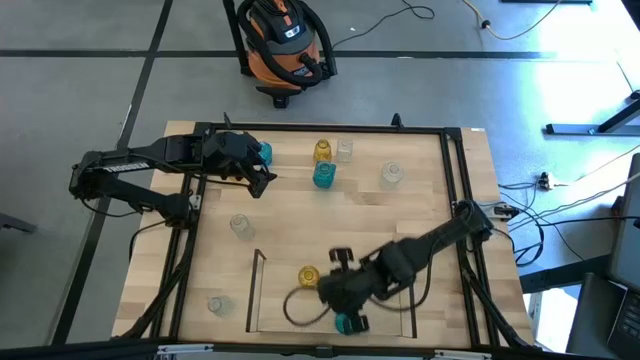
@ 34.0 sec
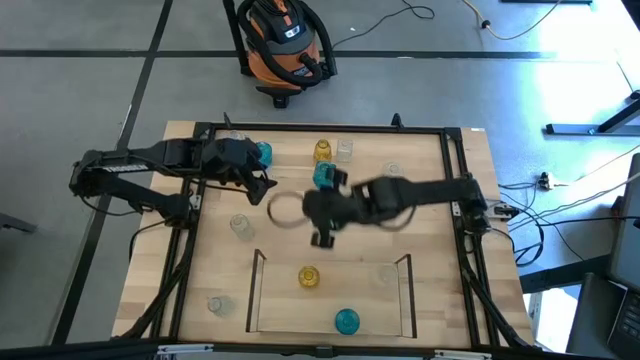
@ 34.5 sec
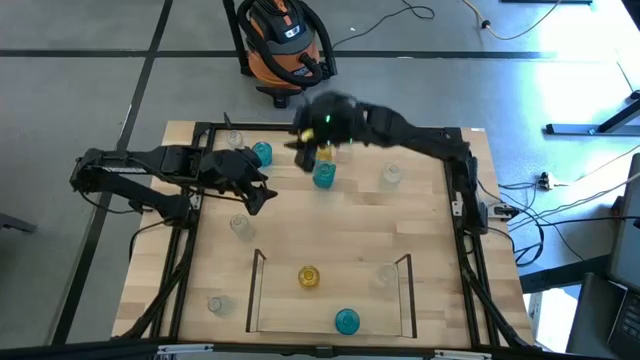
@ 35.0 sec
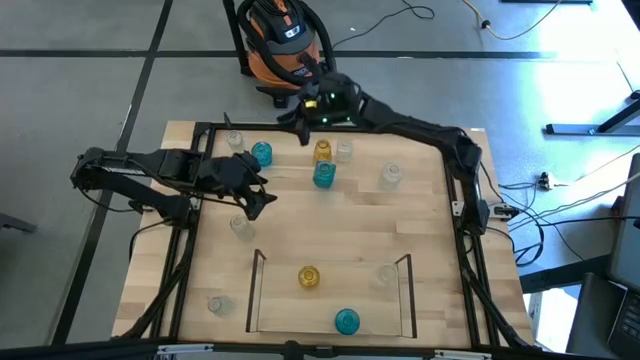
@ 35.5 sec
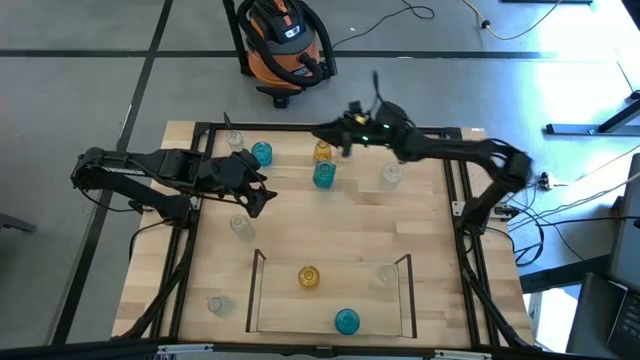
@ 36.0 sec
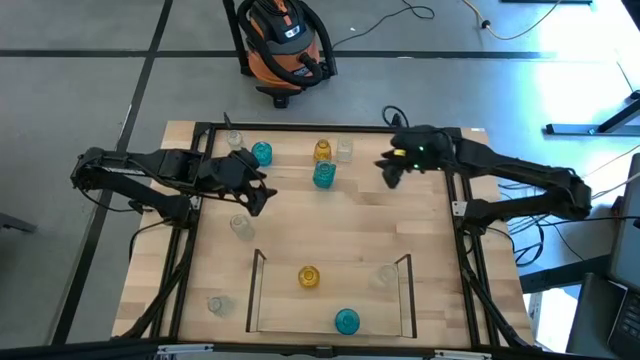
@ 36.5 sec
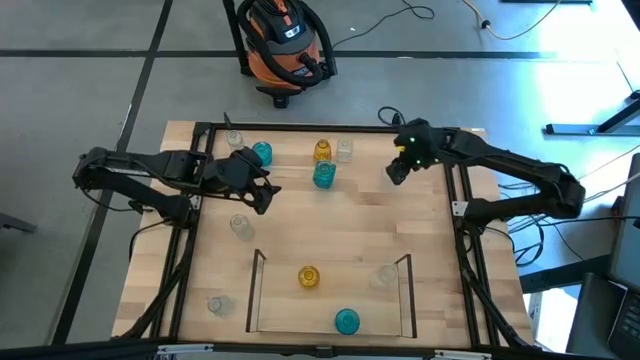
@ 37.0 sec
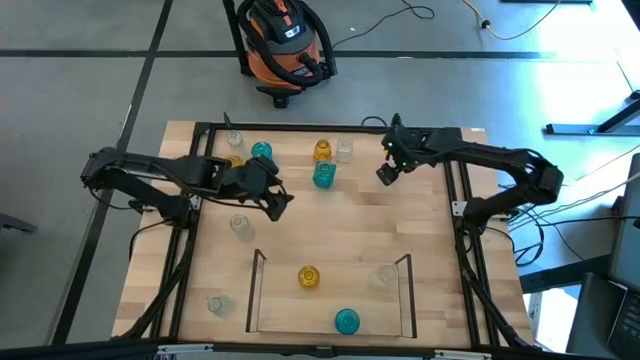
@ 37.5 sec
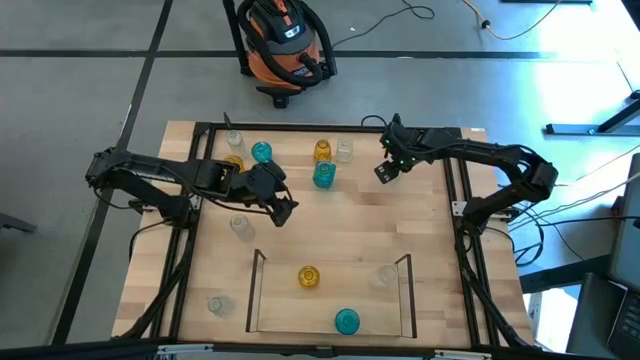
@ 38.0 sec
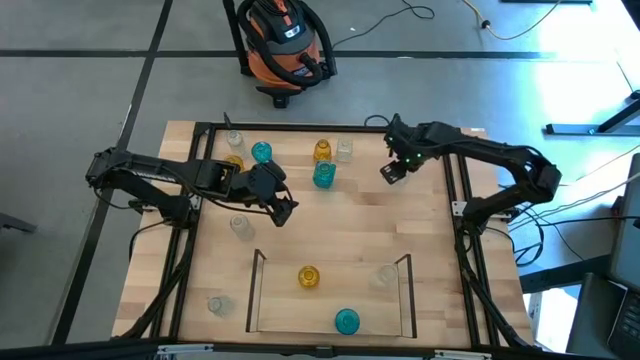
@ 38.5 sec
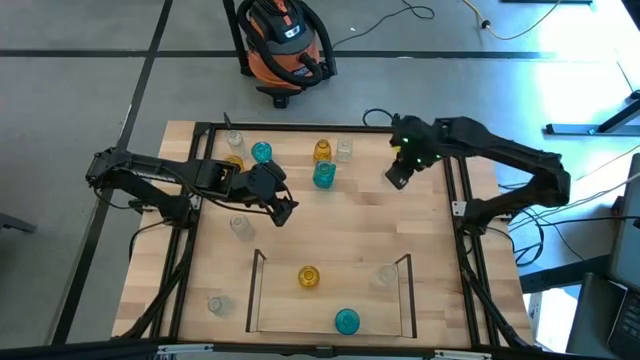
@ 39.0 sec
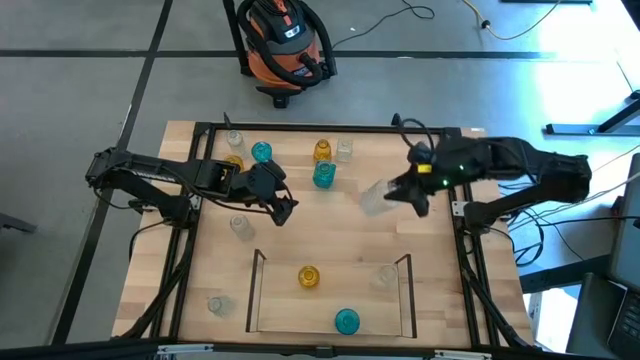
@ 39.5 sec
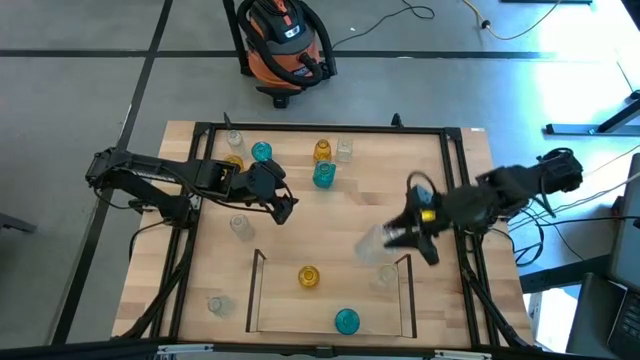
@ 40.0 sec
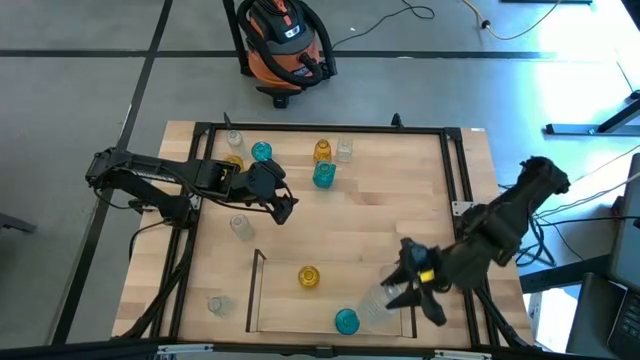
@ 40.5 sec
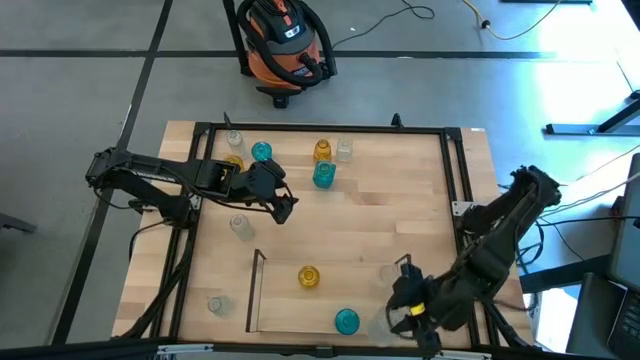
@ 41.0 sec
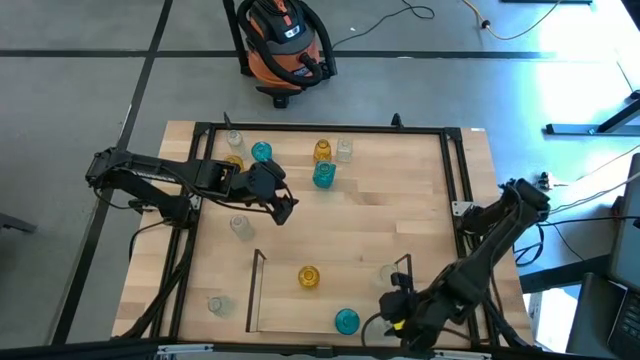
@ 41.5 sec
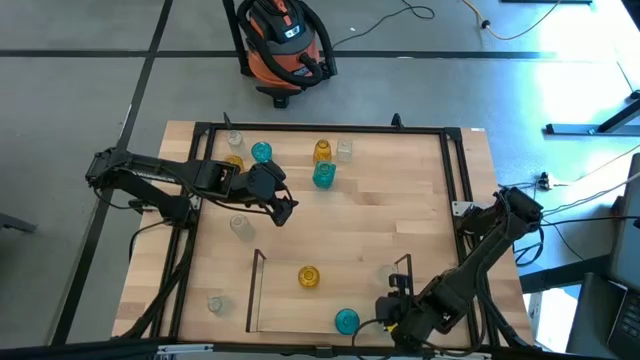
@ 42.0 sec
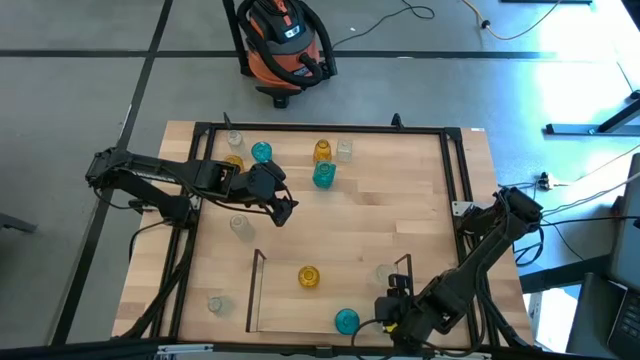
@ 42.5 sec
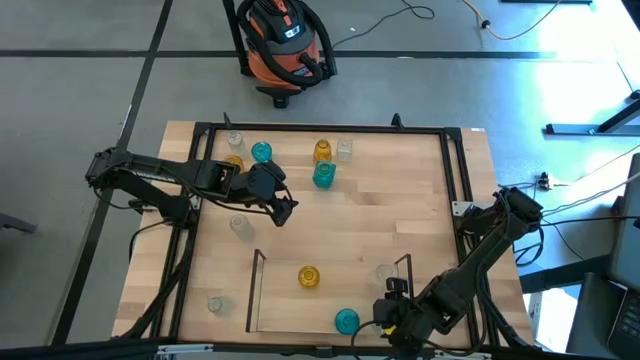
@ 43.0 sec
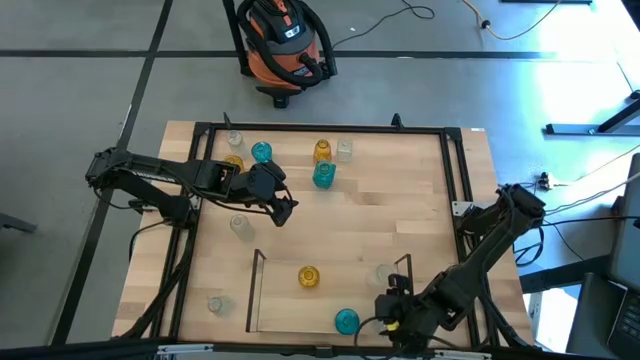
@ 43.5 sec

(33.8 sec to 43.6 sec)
Task: sort vases onto shelf
Put the transparent vase on the shelf

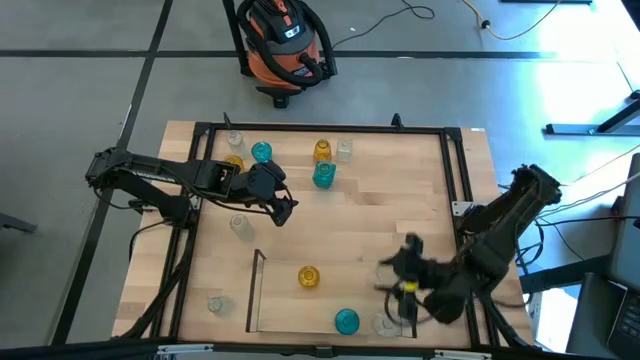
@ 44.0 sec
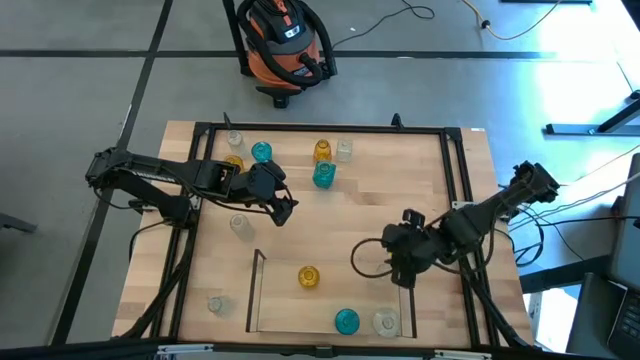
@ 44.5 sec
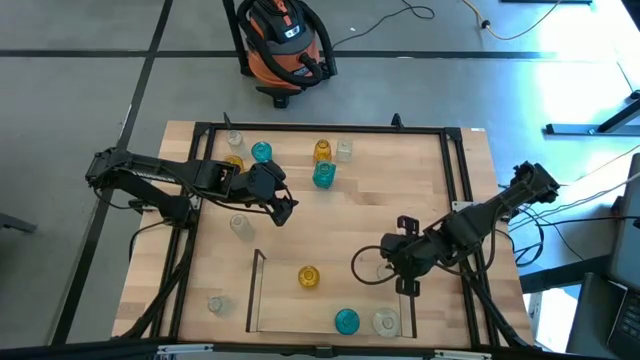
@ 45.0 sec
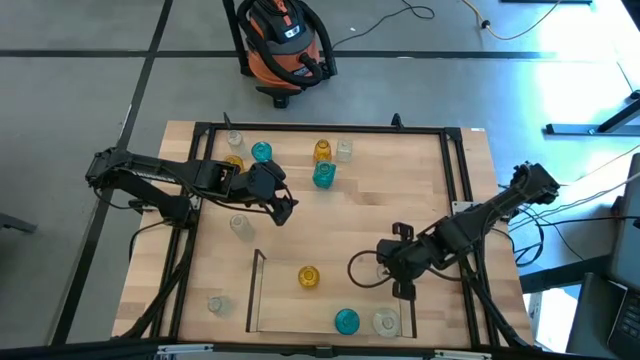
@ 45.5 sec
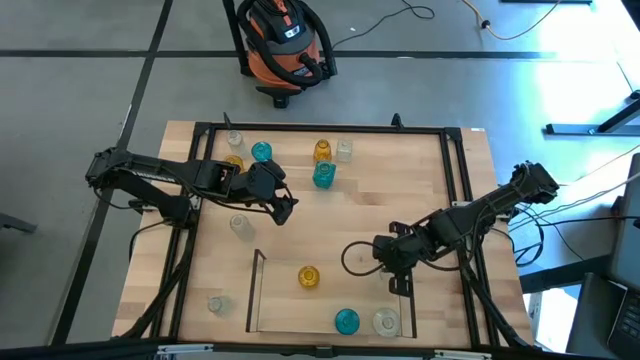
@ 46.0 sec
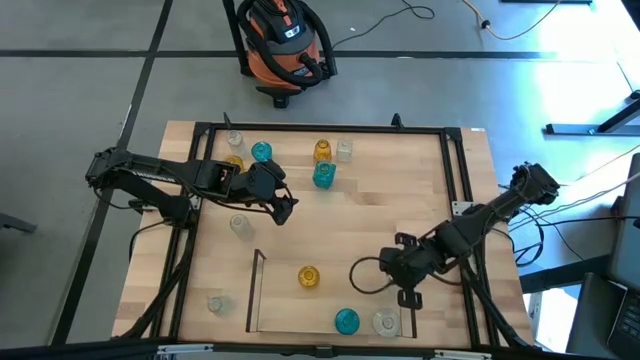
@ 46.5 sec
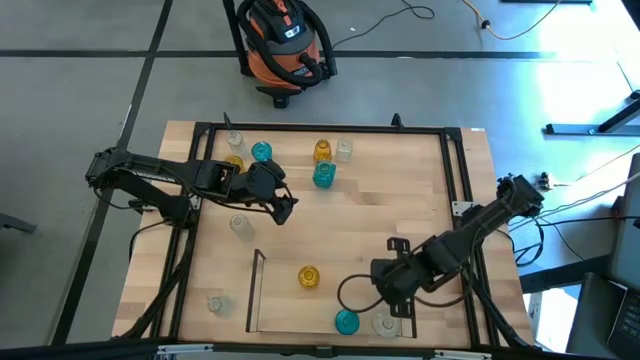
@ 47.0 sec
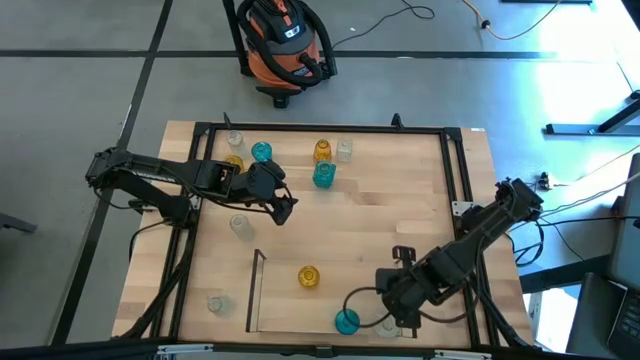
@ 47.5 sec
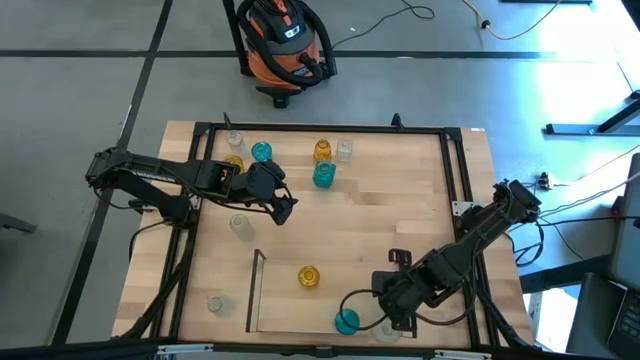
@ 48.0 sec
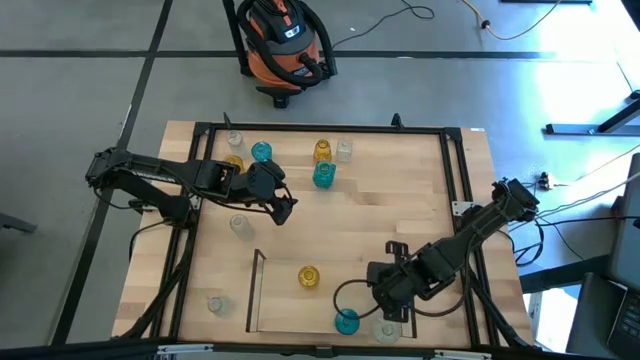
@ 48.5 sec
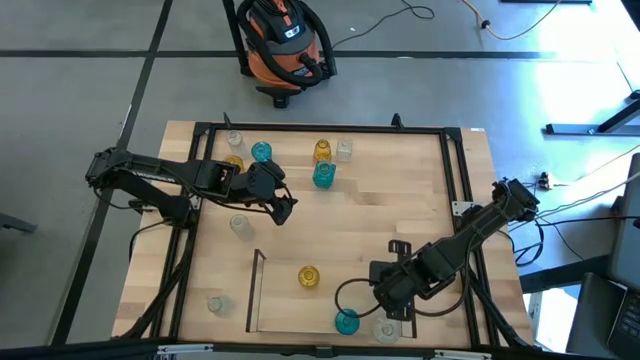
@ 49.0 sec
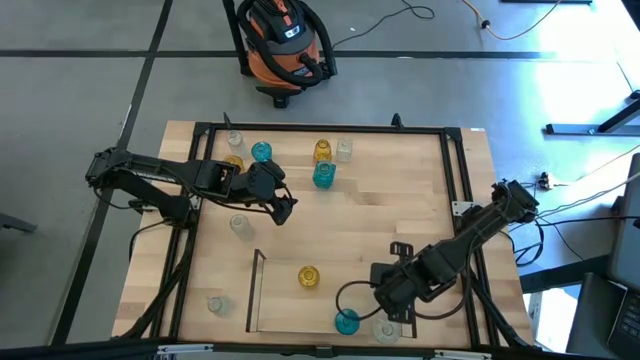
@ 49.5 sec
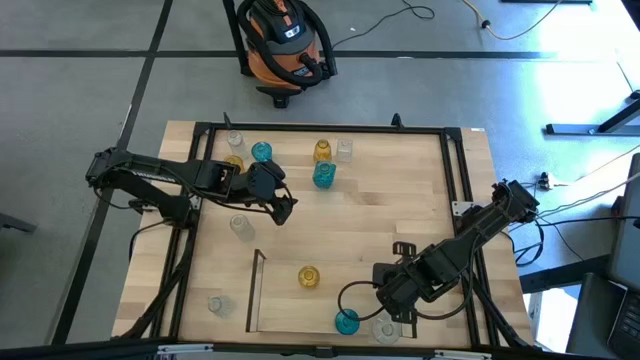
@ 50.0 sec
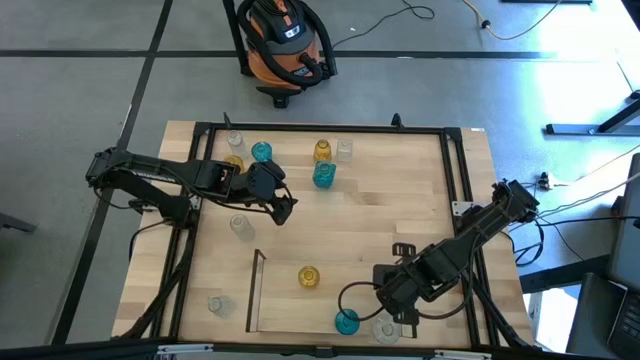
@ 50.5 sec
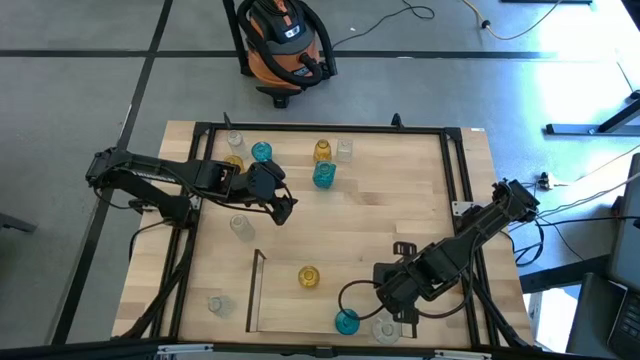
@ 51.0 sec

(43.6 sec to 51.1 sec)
Put the blue flower vase on the shelf aligned with the other blue flower vase

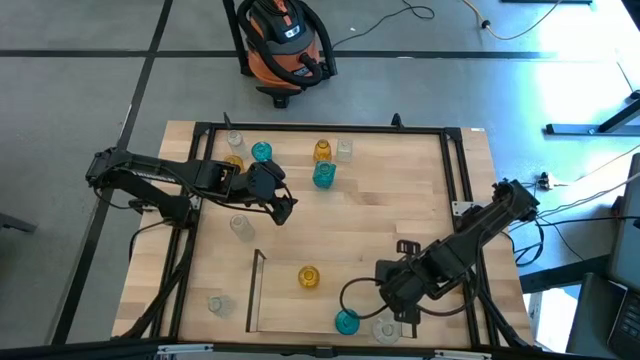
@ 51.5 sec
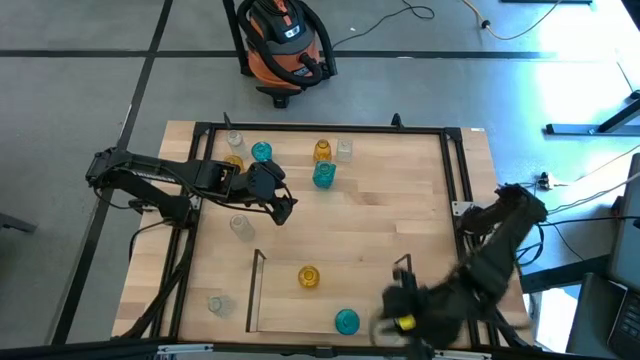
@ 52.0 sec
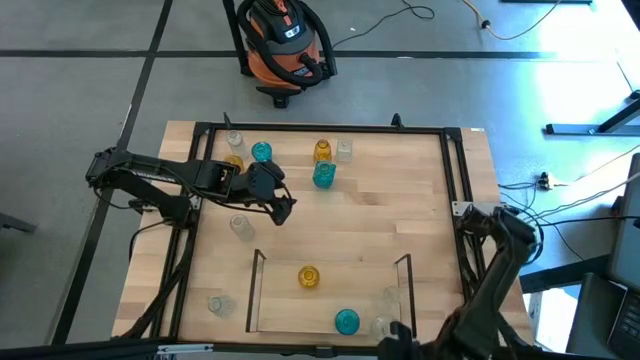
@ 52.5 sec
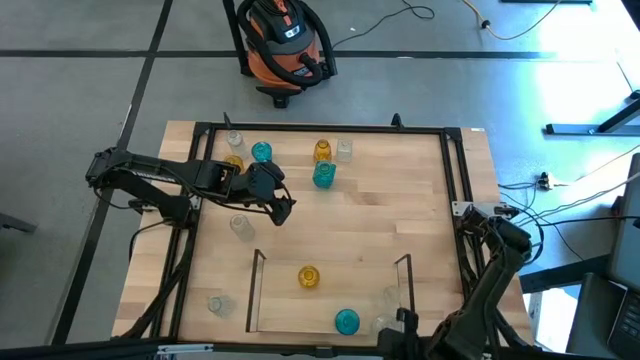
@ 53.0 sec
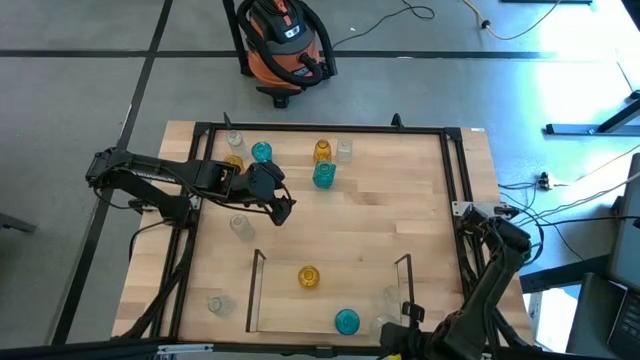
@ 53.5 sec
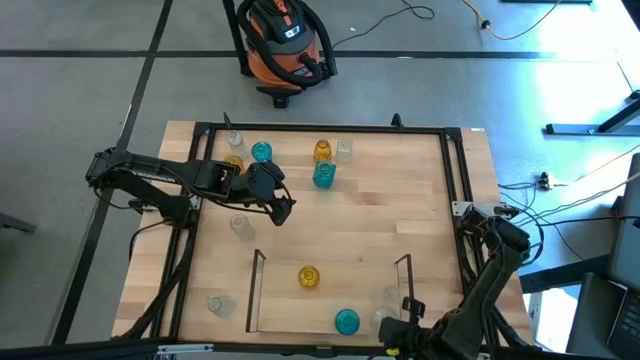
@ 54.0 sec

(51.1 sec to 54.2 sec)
Adjust the transparent vase on the shelf
